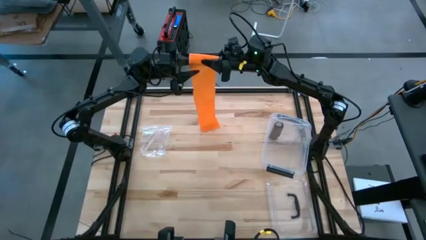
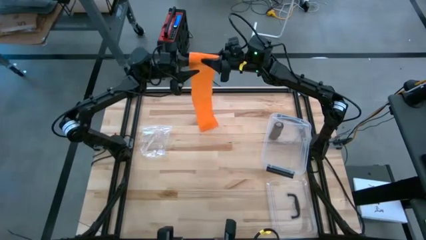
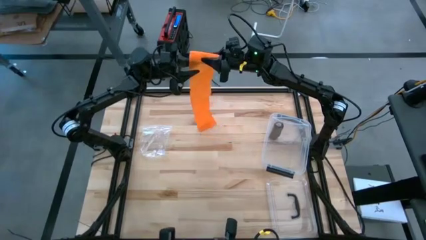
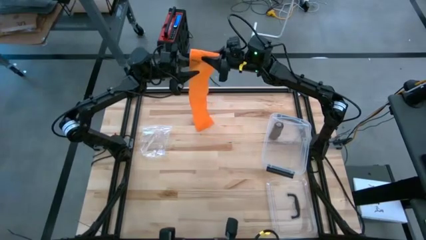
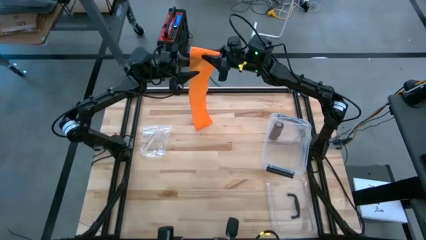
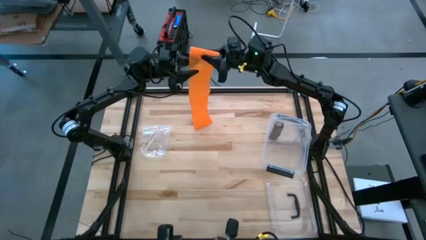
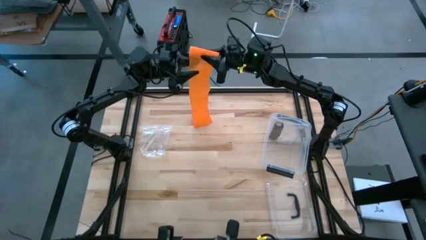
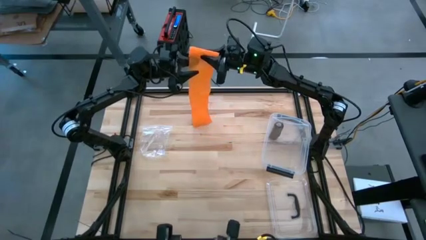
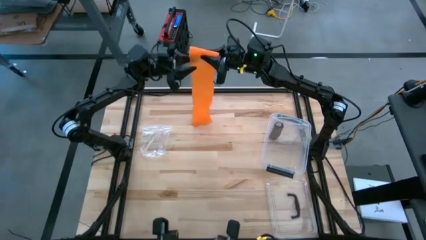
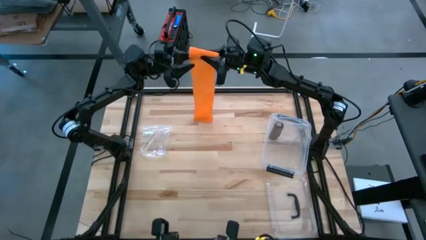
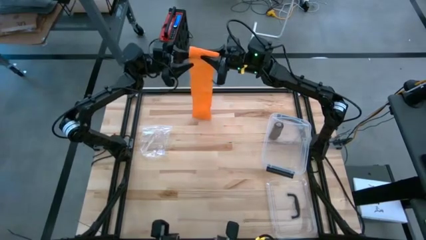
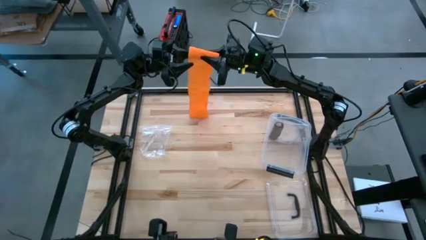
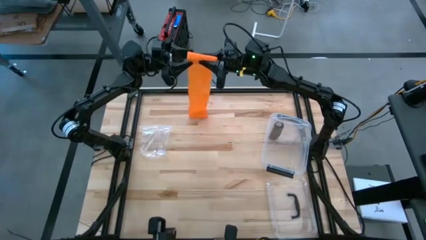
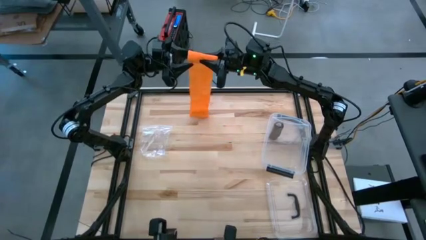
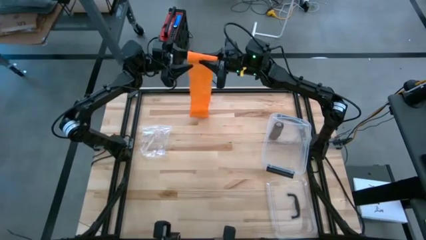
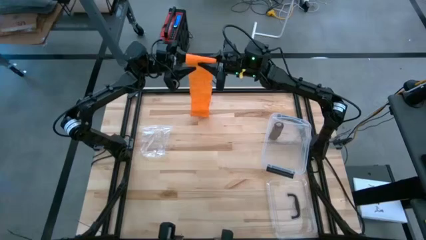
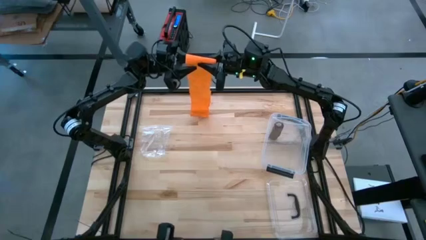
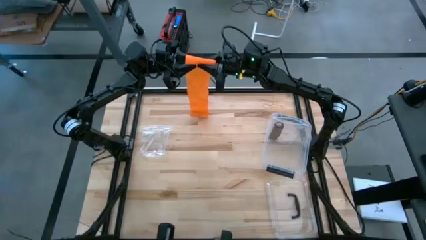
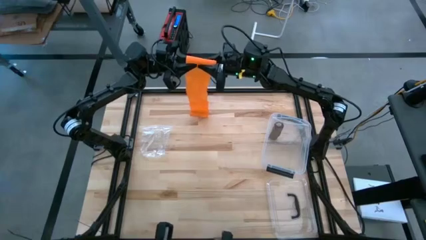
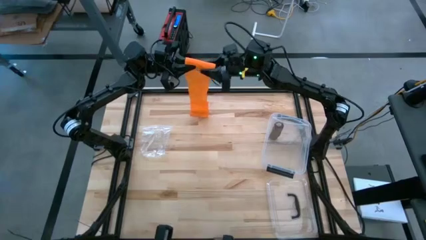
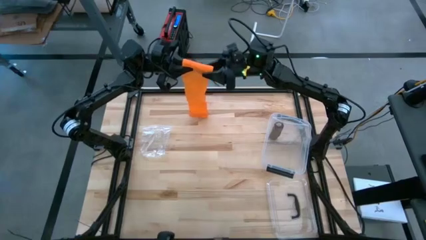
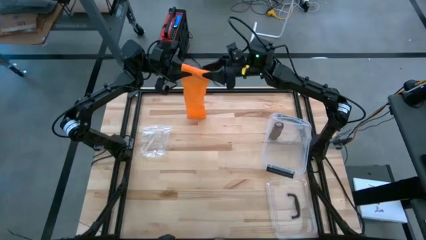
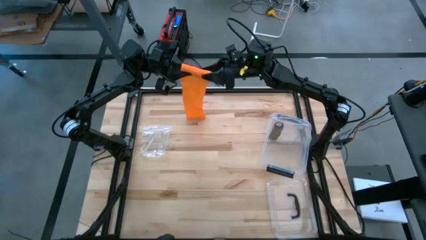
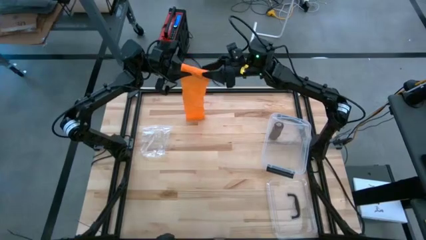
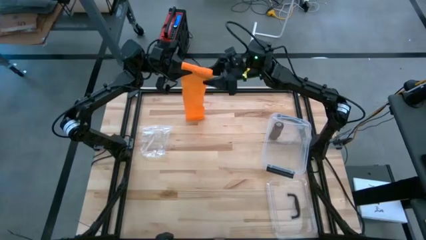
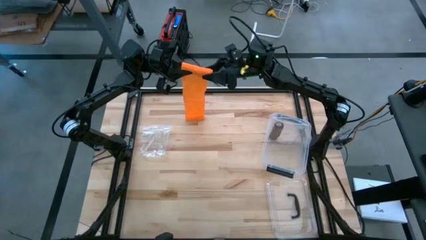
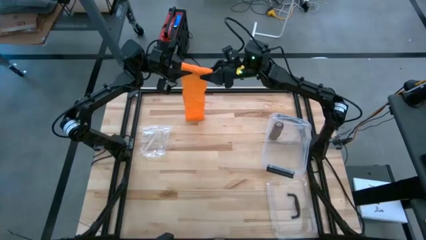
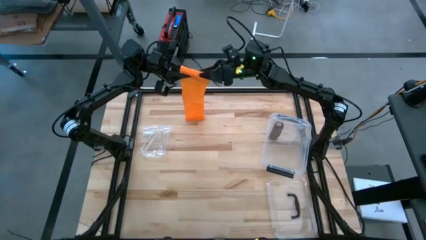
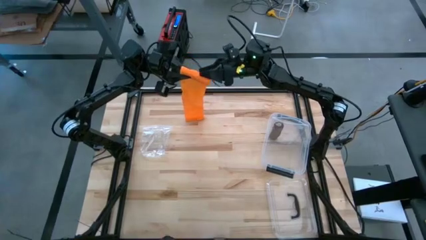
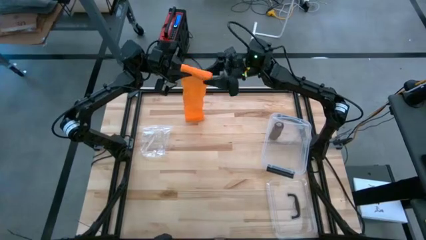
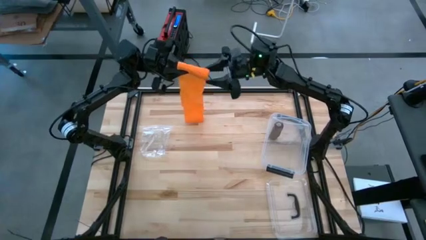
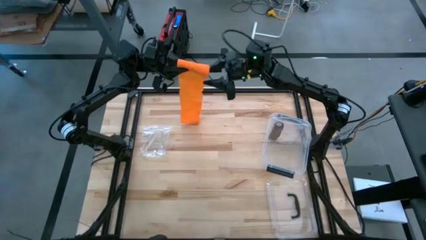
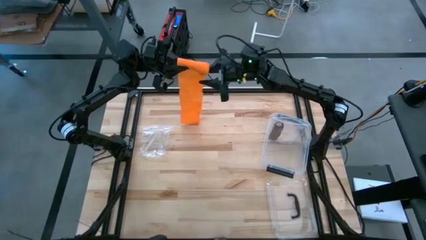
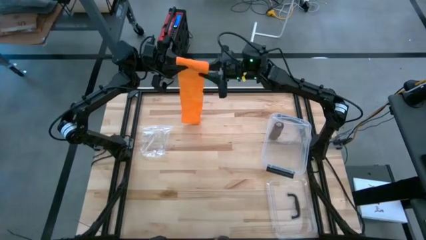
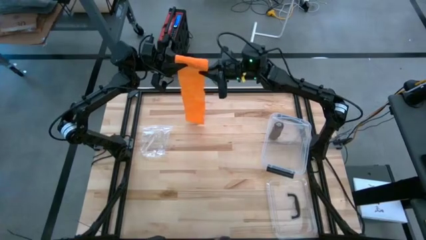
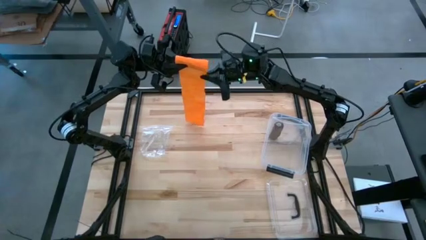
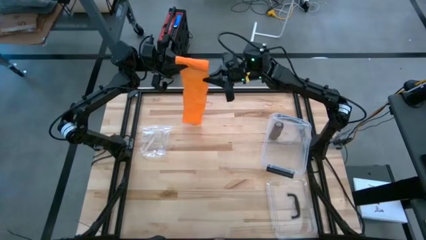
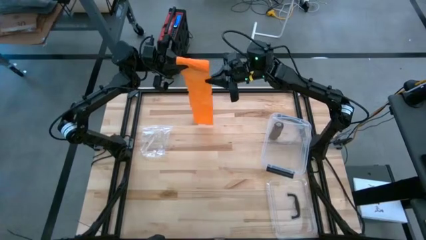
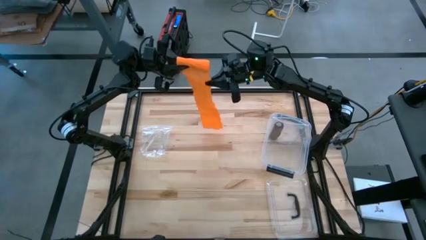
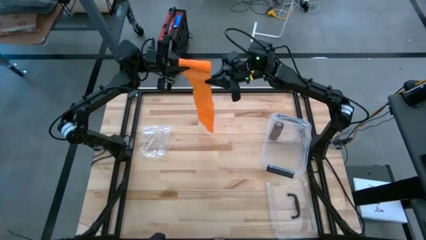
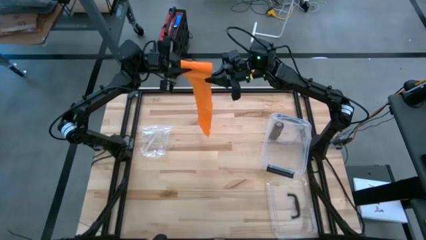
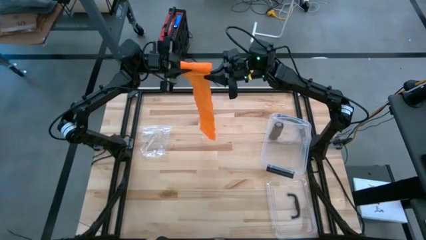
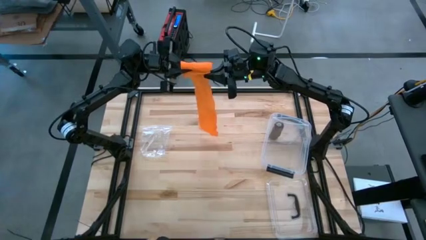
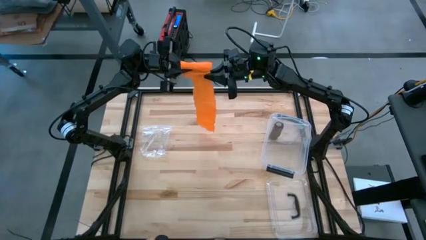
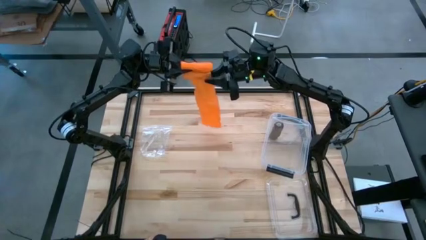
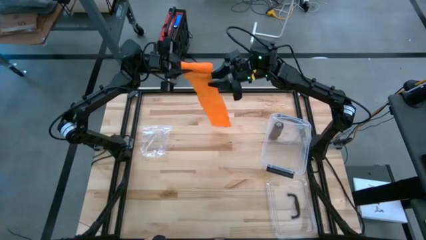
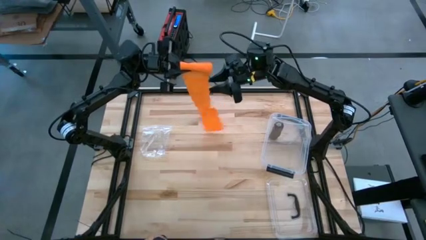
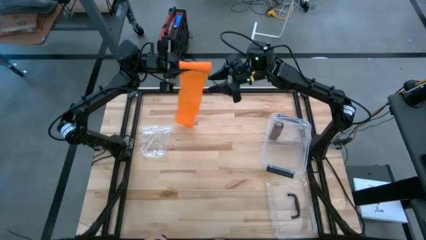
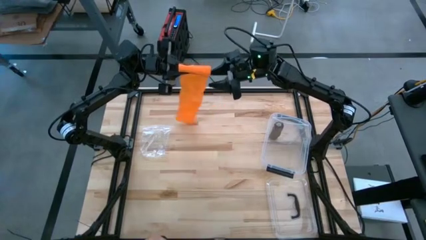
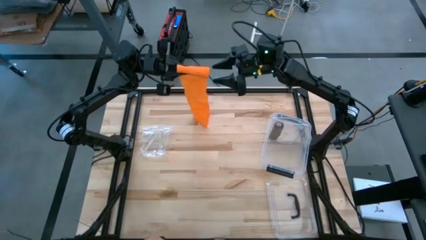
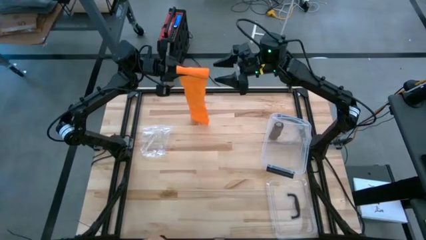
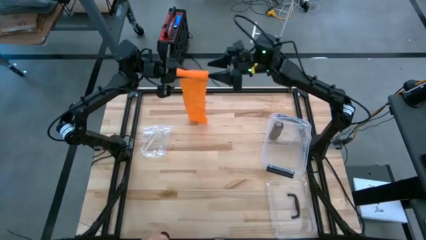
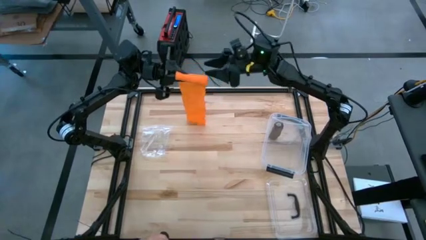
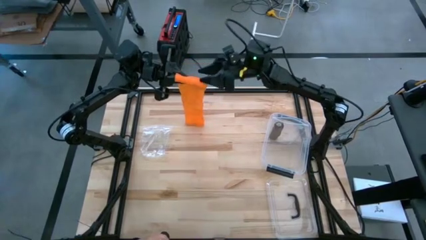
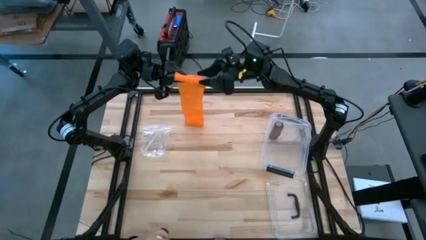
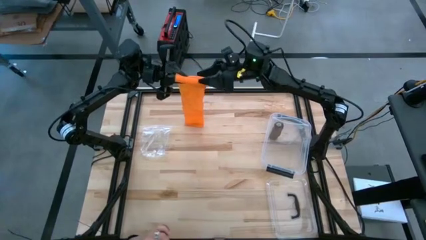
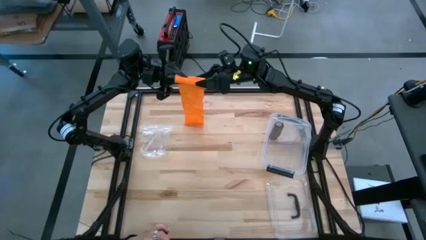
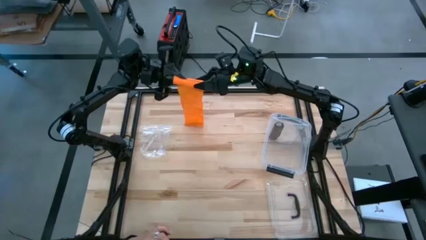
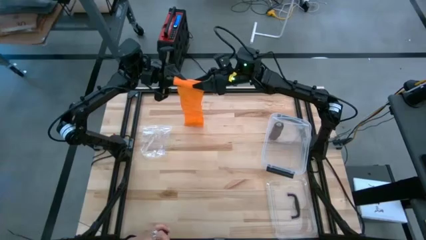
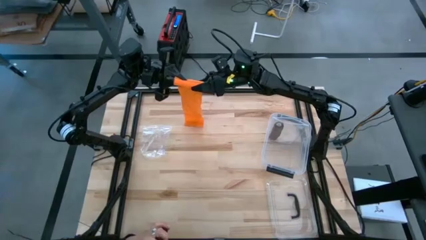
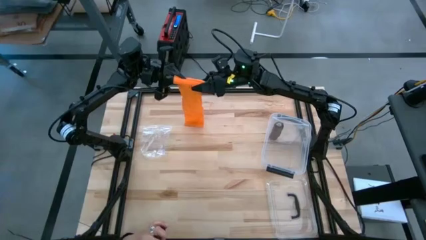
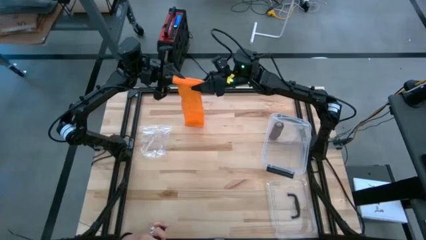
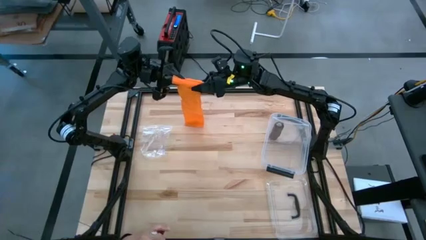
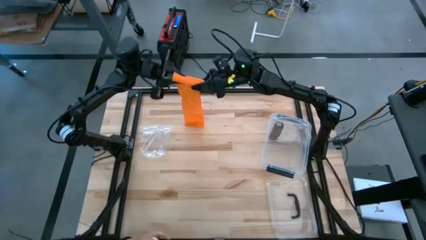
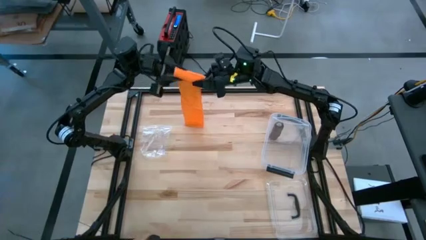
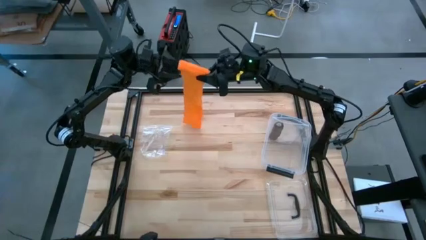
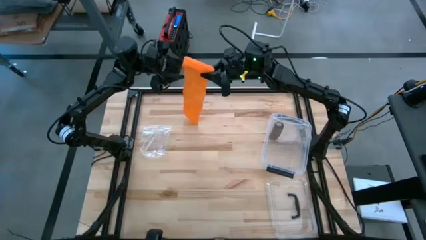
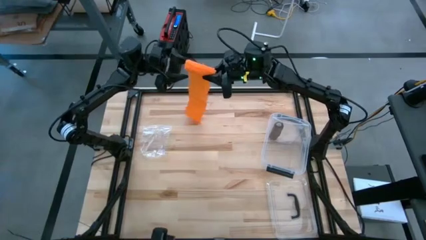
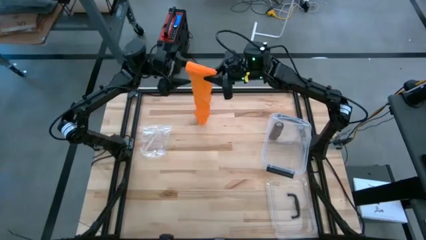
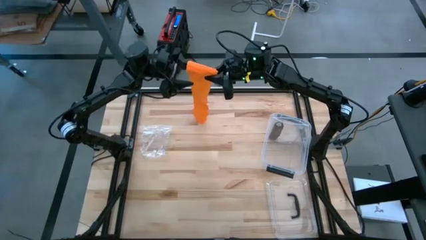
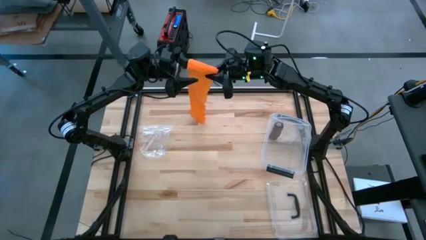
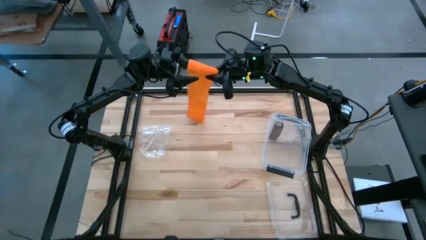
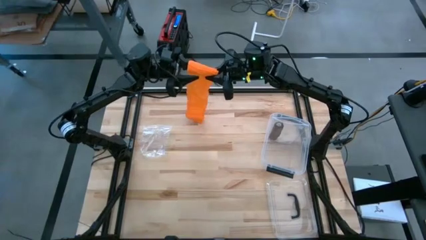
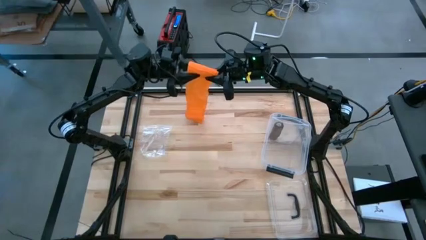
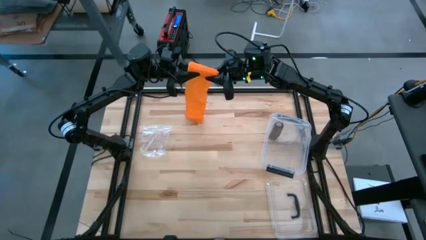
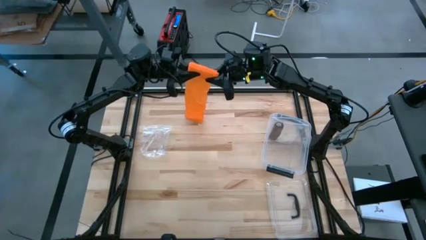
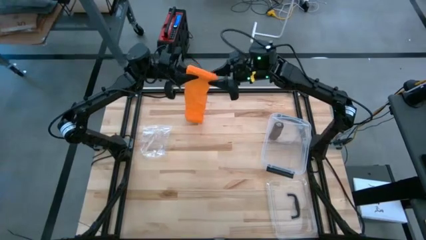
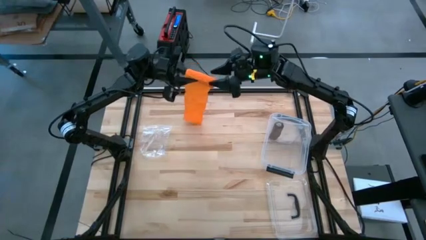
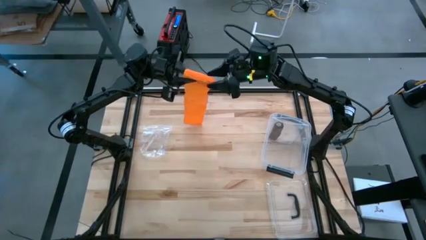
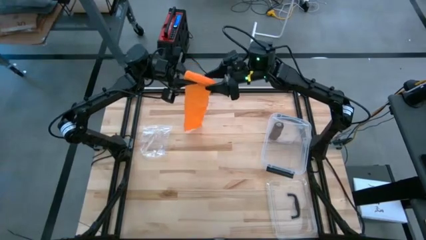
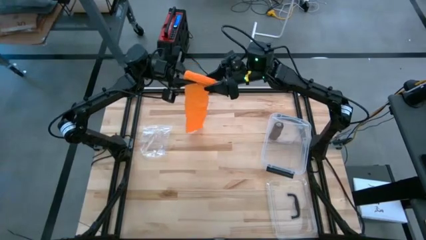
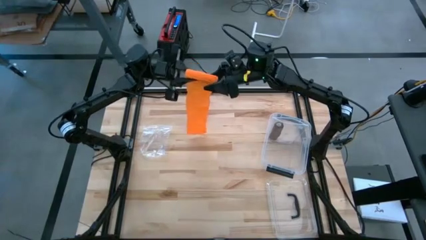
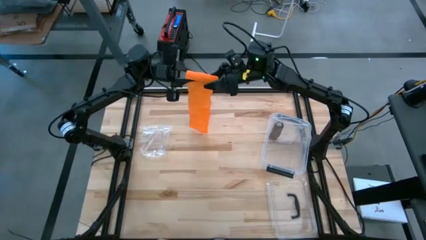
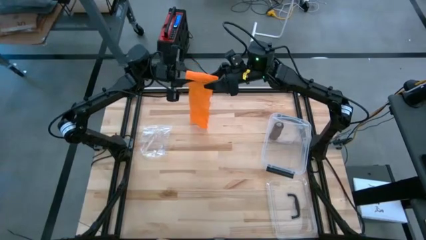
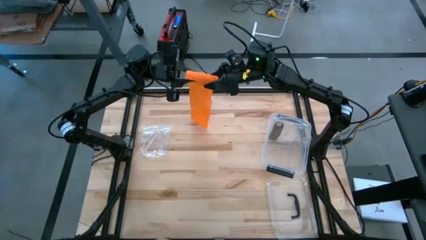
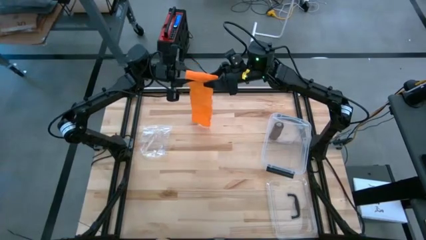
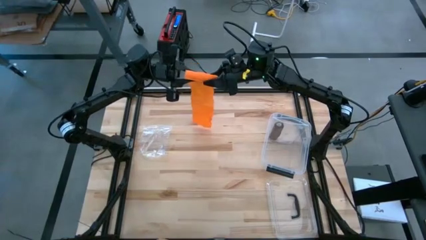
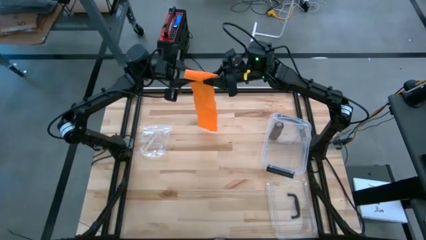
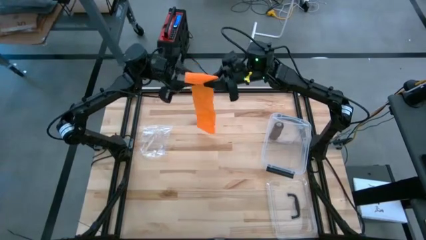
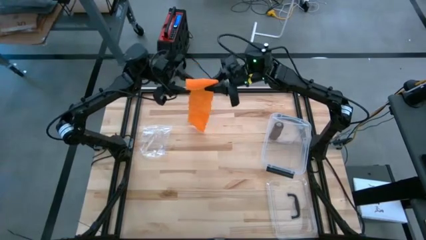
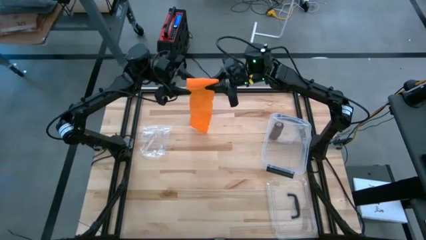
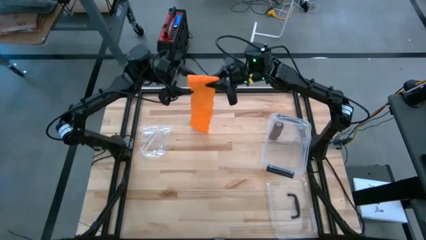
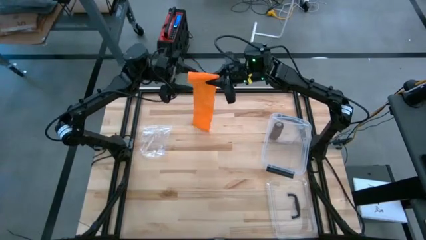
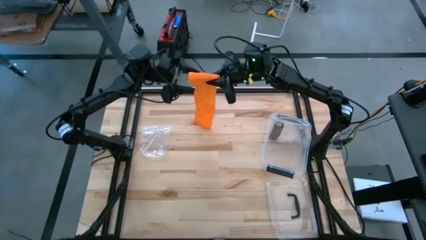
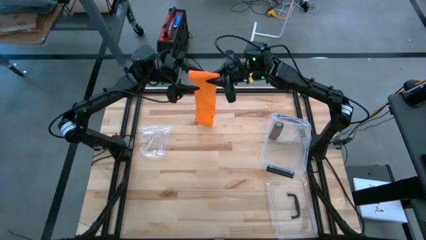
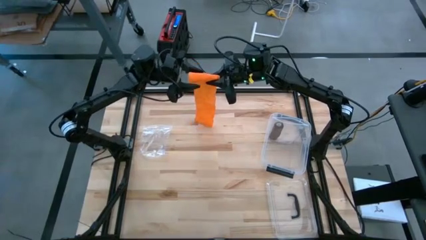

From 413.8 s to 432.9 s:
Task: Roll bandage
Roll the orange bandage
